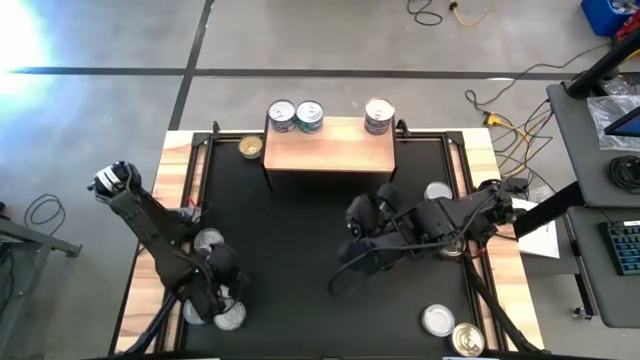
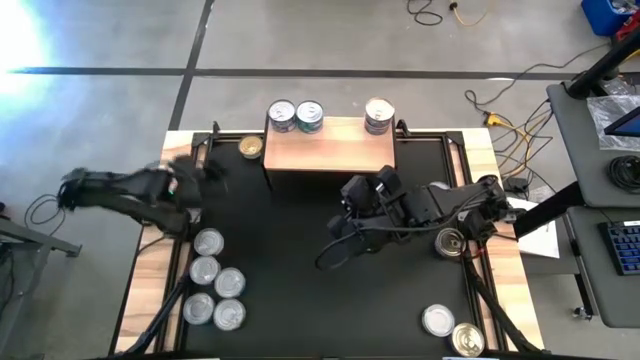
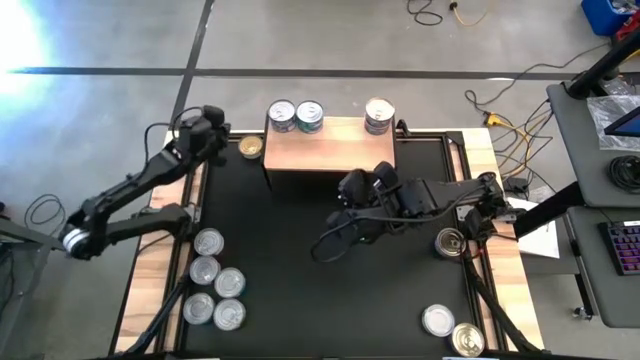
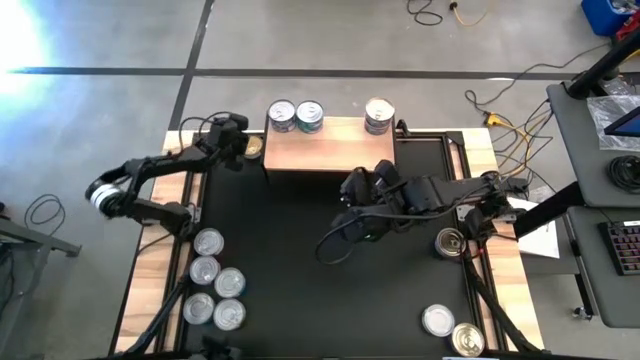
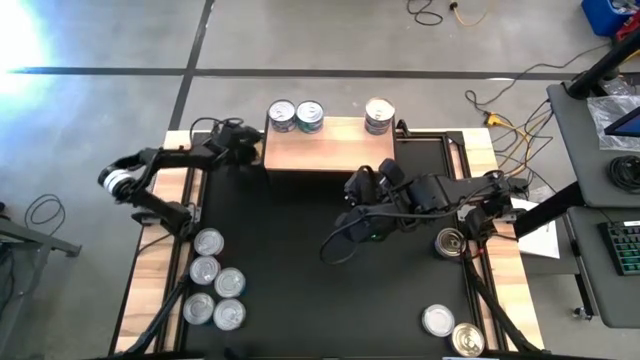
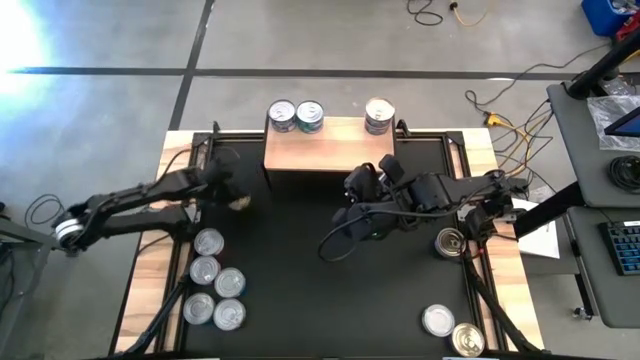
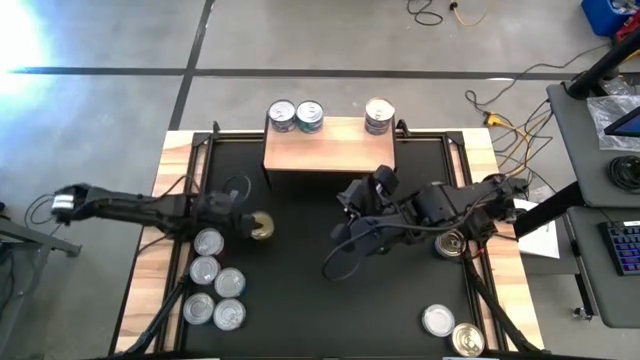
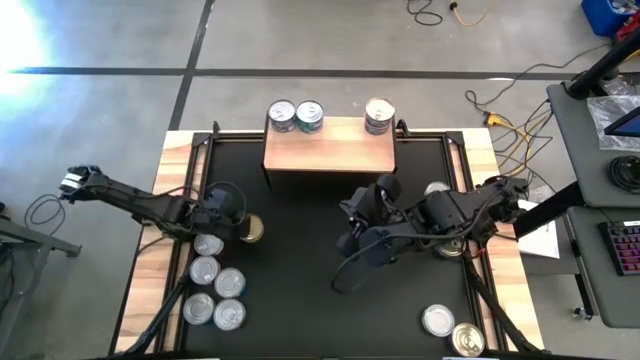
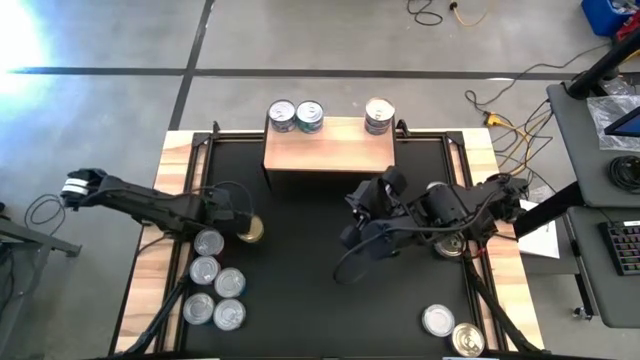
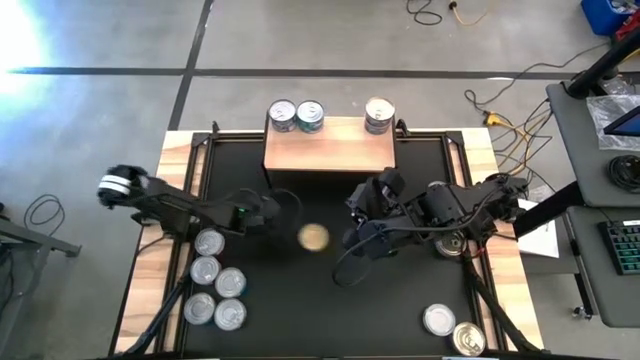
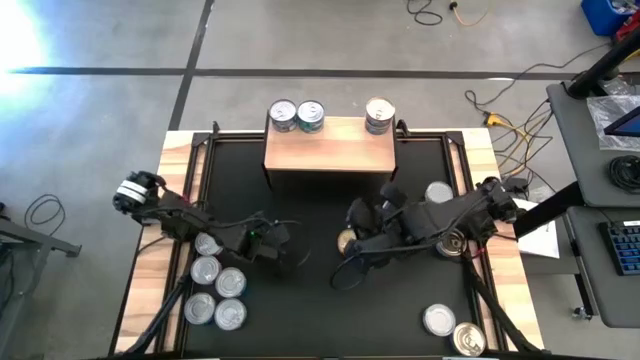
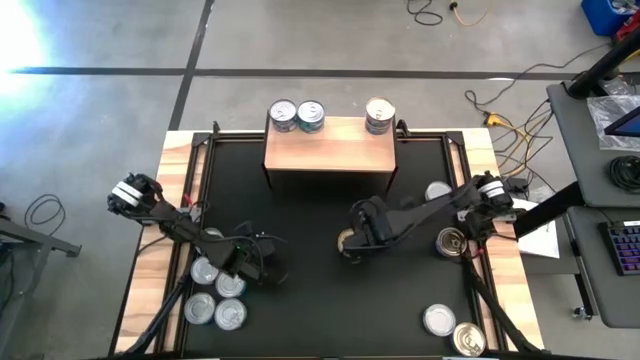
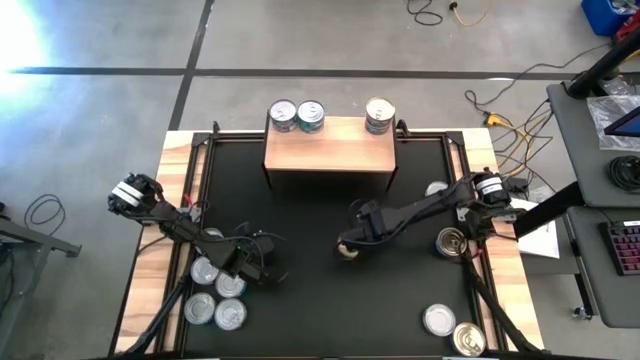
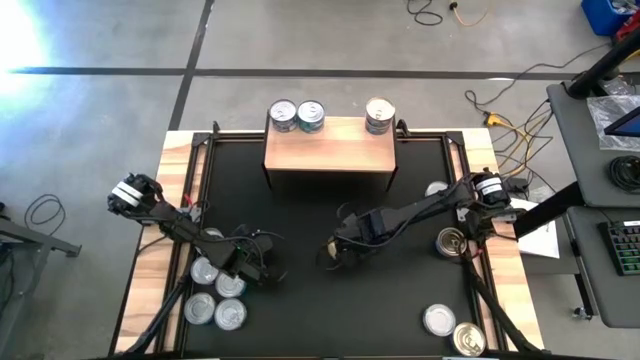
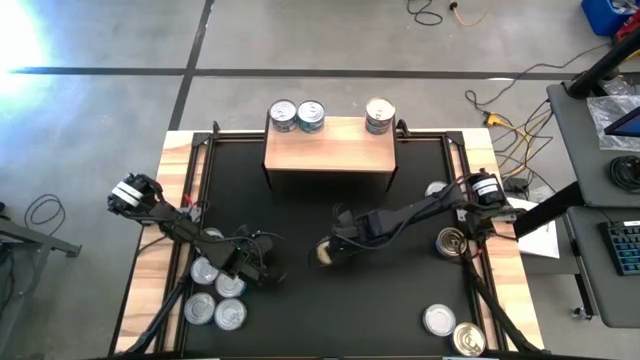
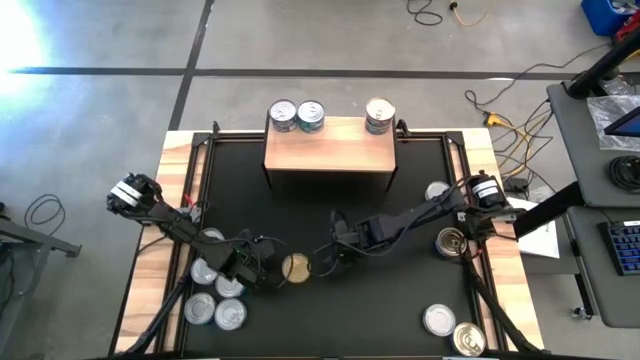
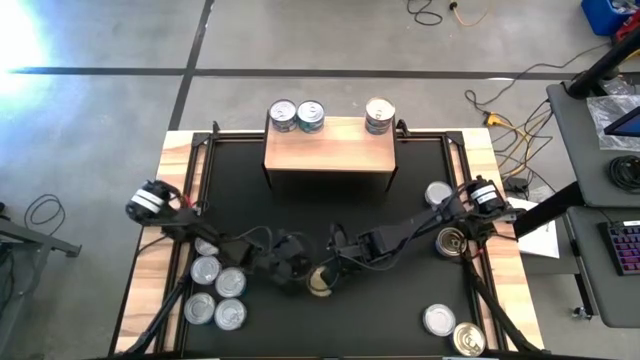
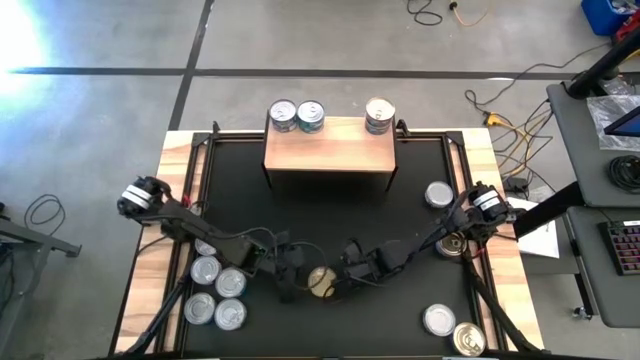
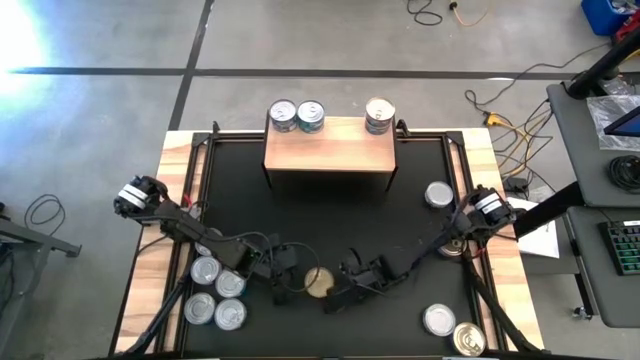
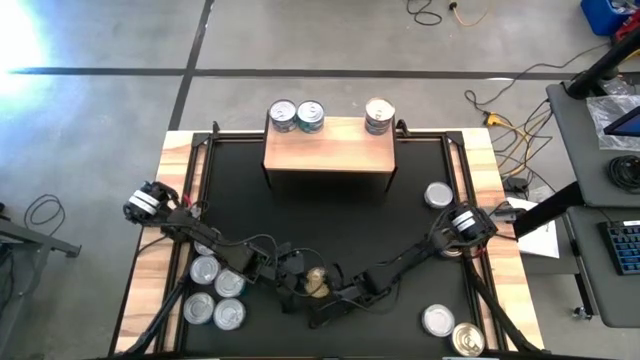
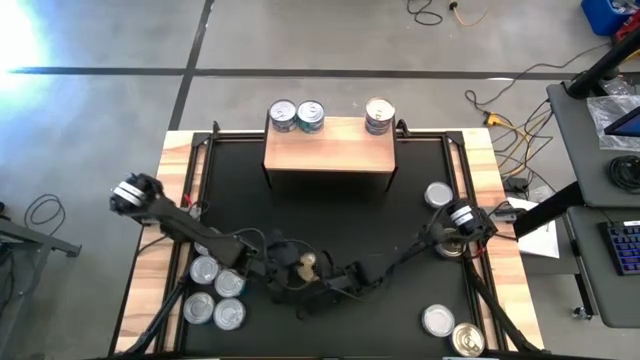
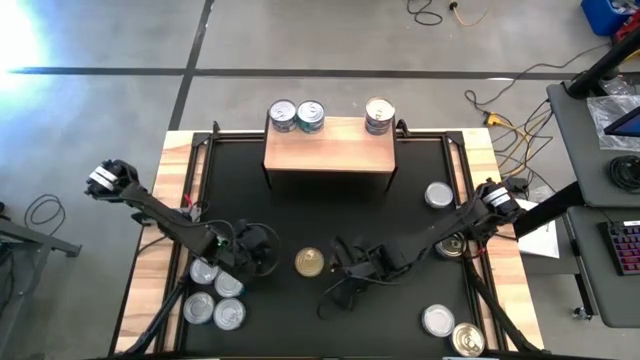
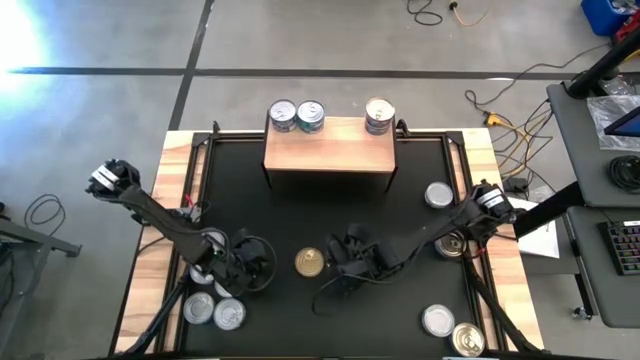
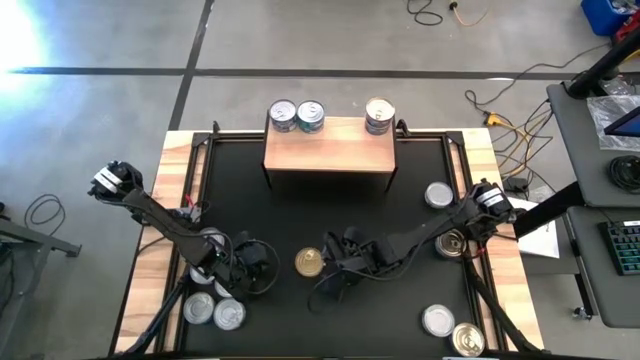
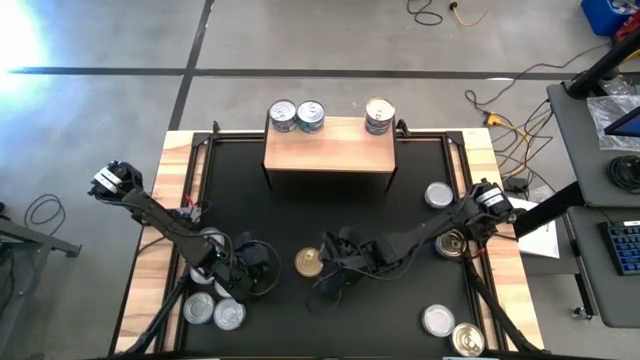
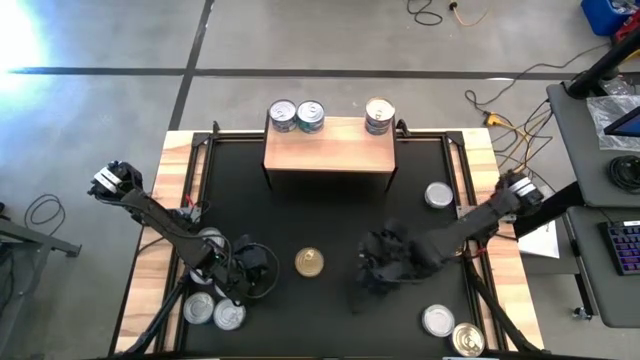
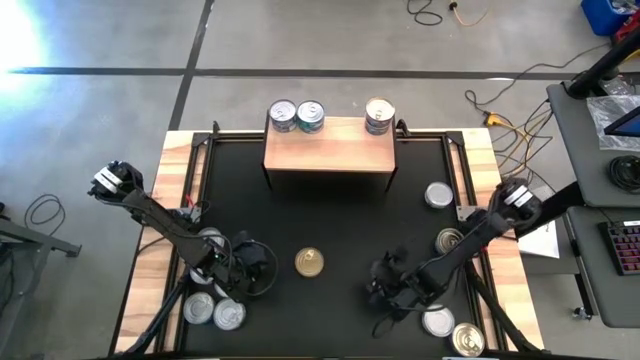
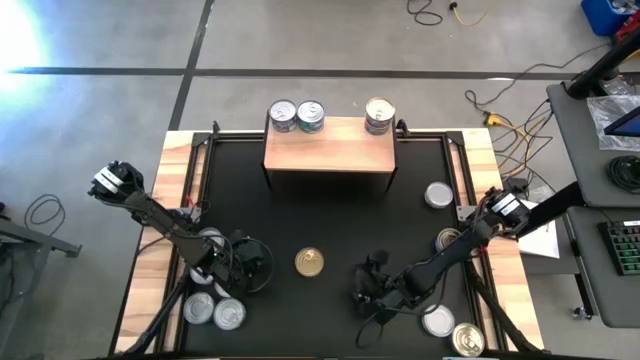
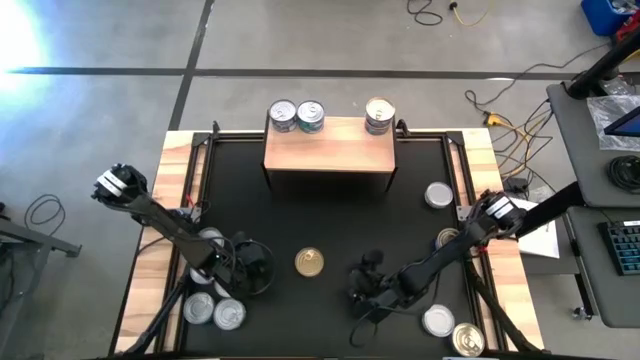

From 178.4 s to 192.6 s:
Task: Stack canned seafood by type on shelf
Put the top green tuna can on the shelf

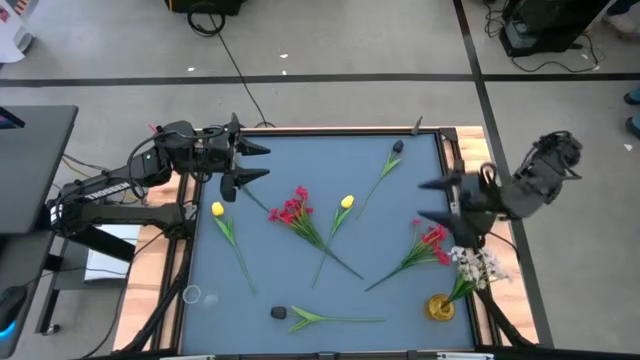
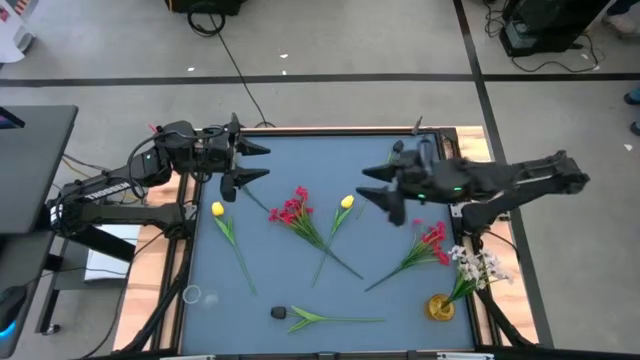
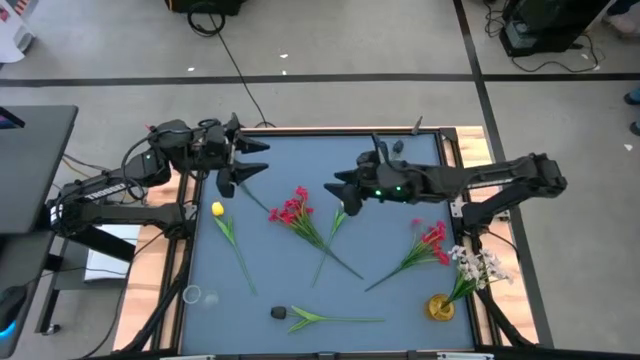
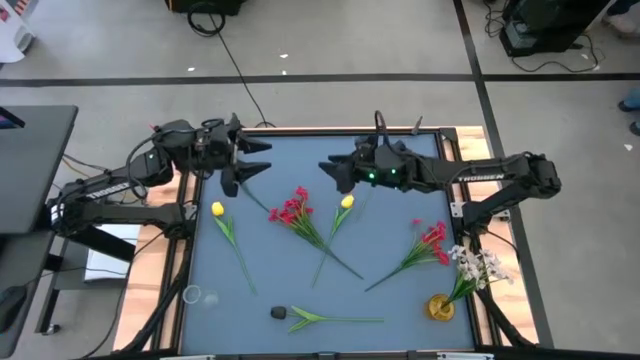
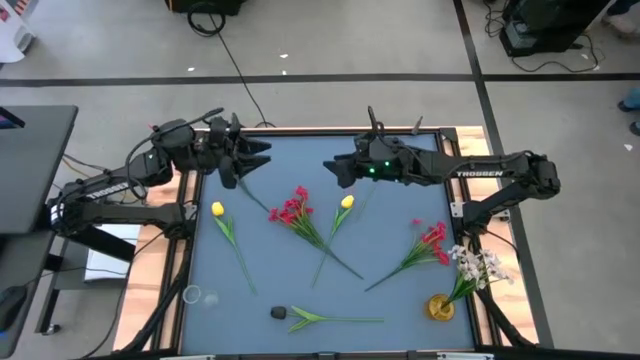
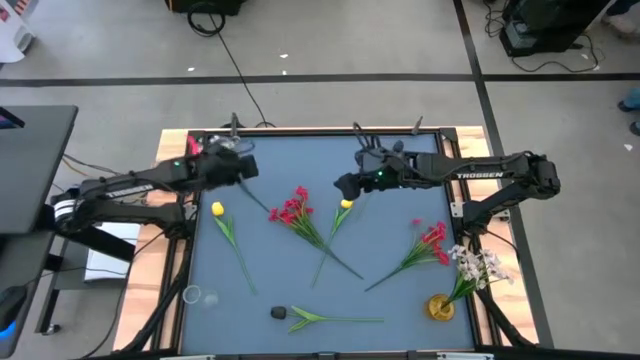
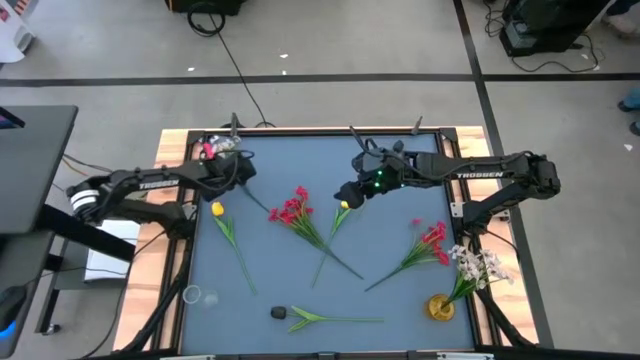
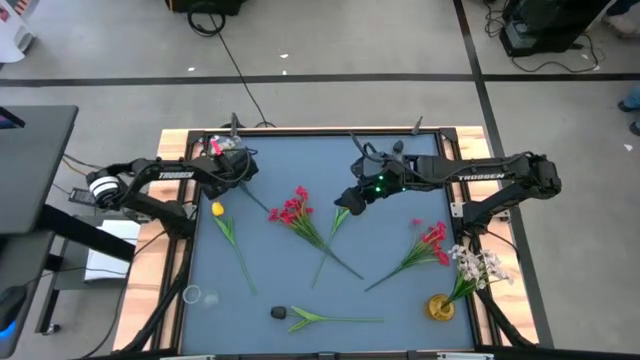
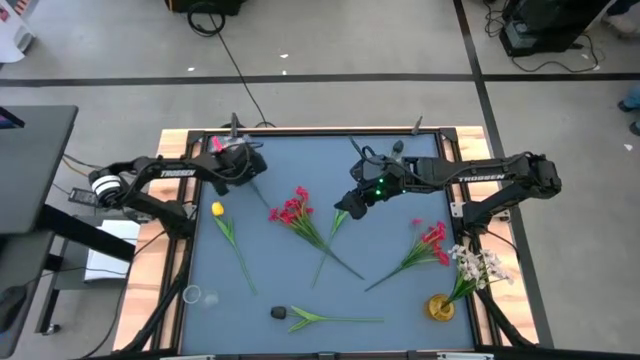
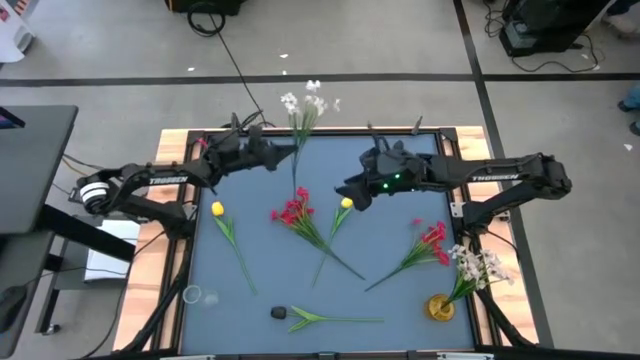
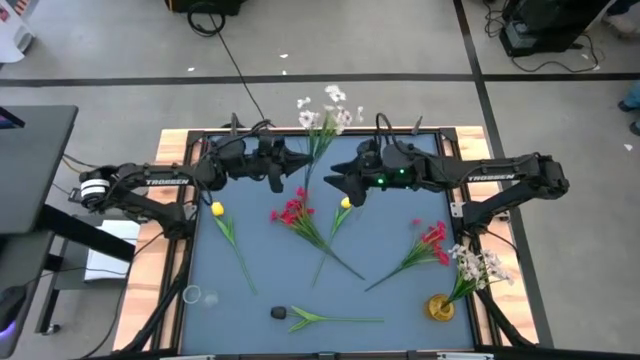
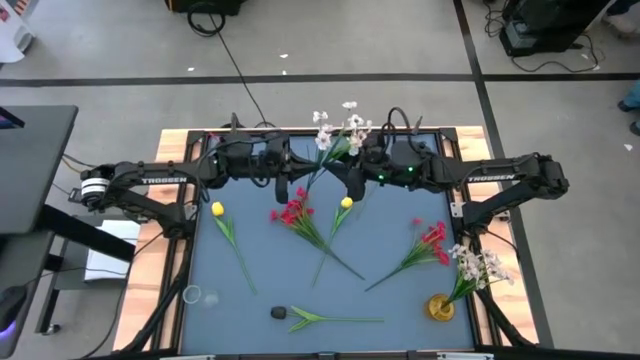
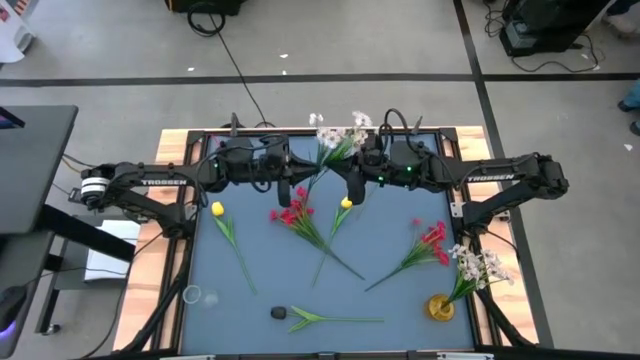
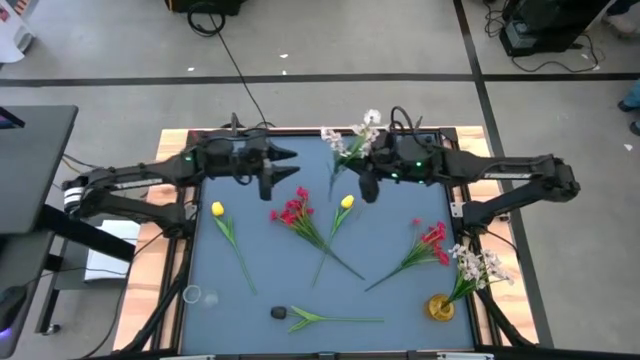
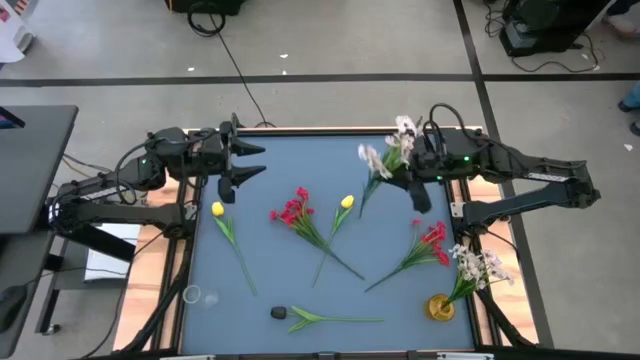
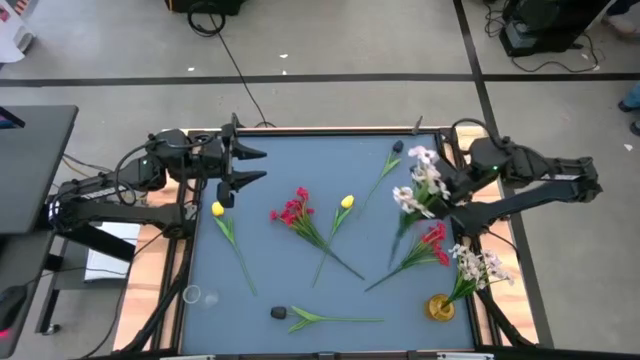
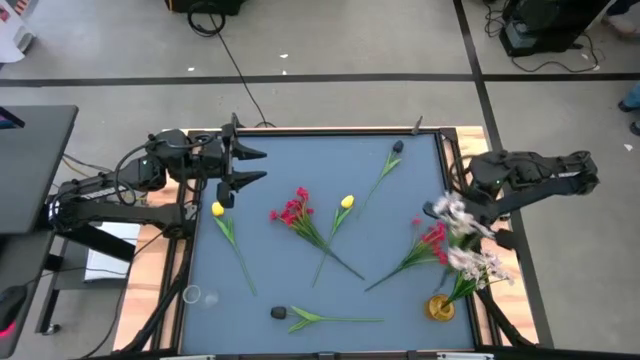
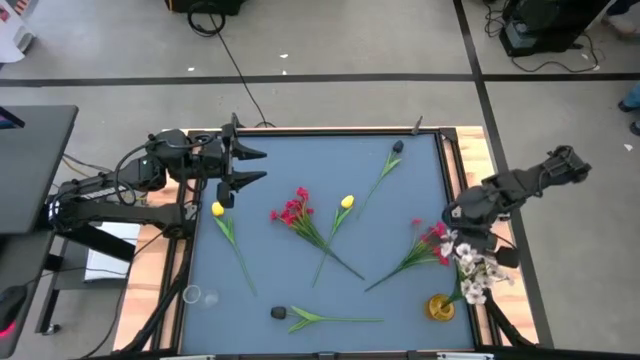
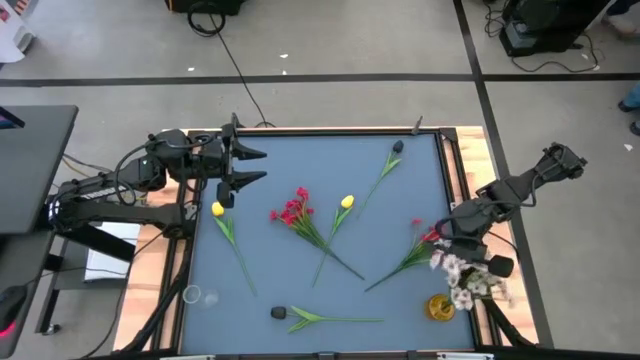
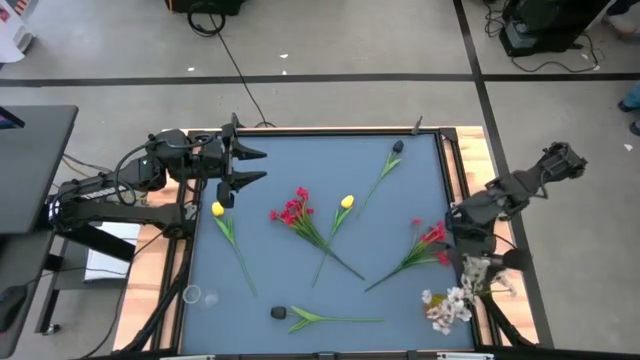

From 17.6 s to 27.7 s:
Task: Sort flowers into vase by color
Put the white flower into the yellow flower vase
